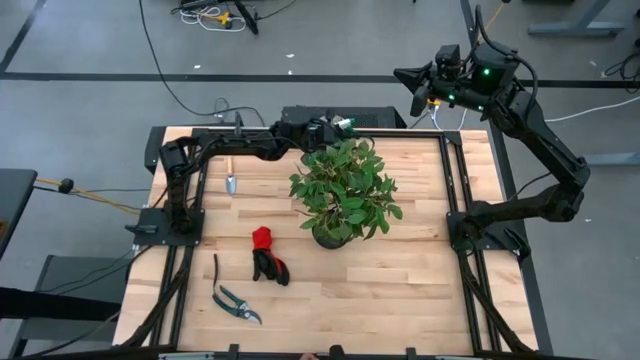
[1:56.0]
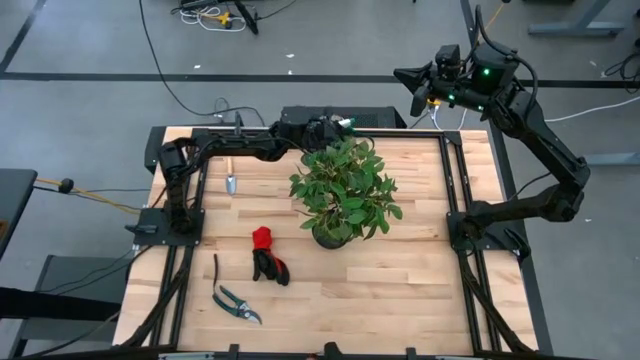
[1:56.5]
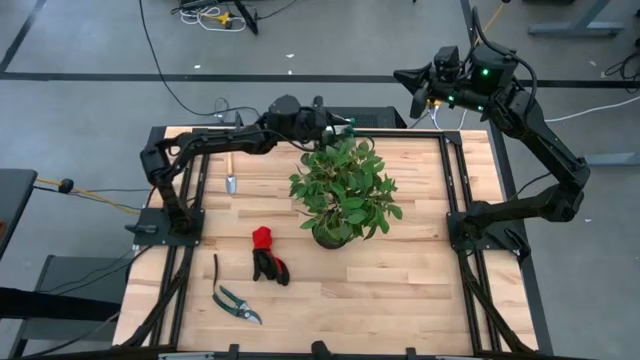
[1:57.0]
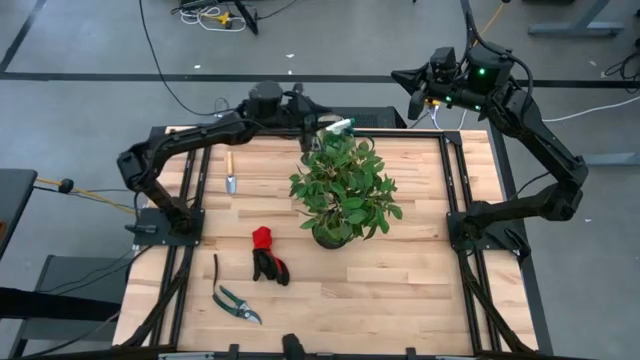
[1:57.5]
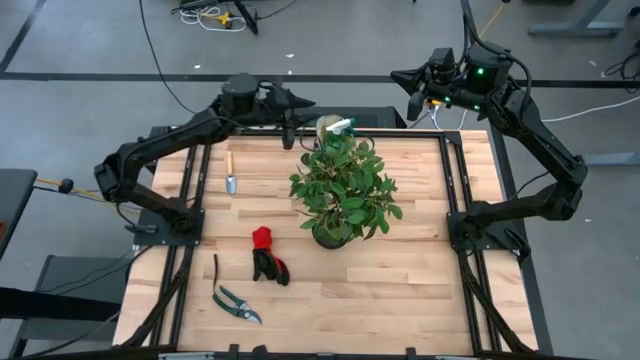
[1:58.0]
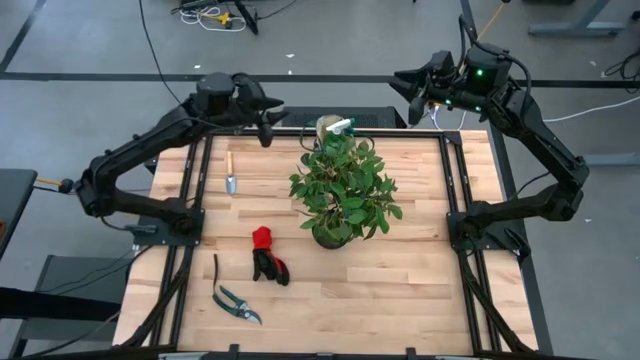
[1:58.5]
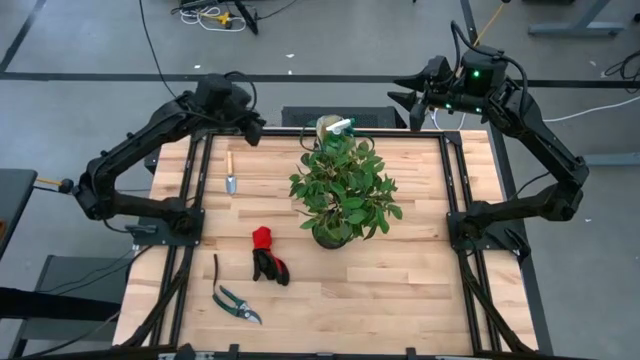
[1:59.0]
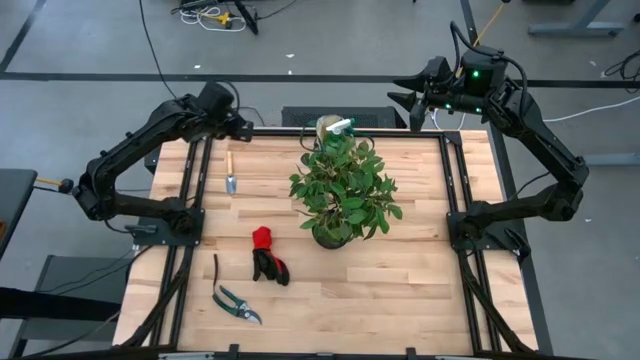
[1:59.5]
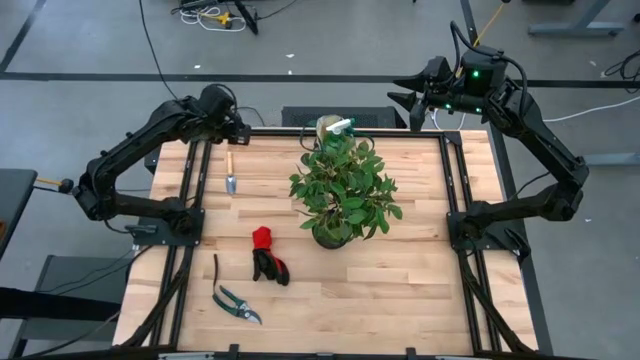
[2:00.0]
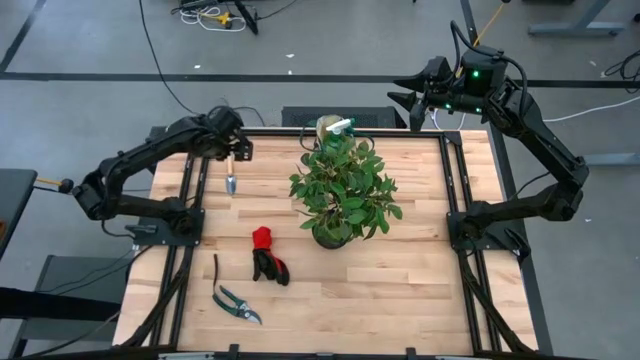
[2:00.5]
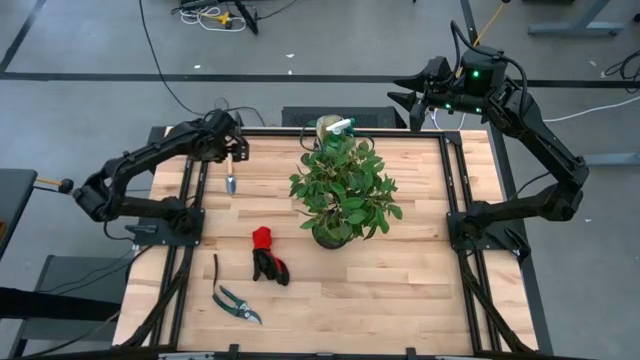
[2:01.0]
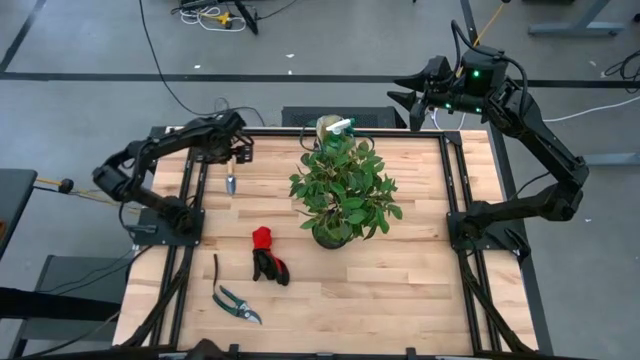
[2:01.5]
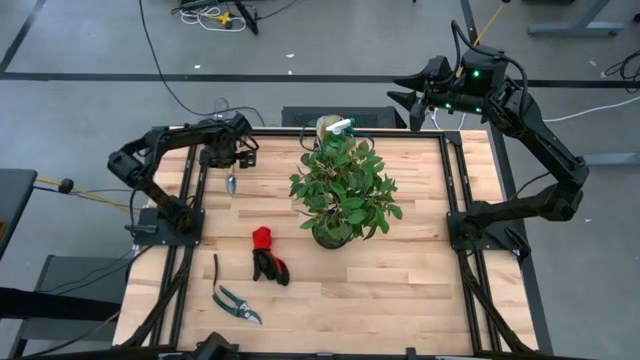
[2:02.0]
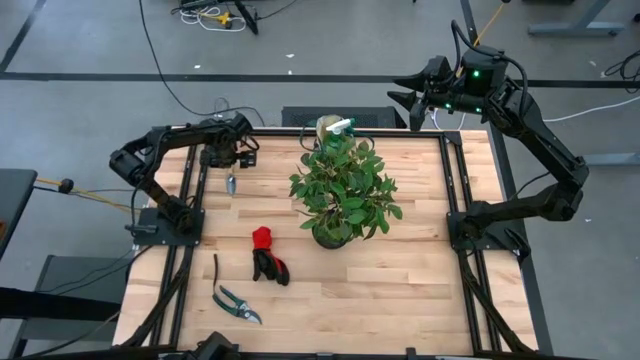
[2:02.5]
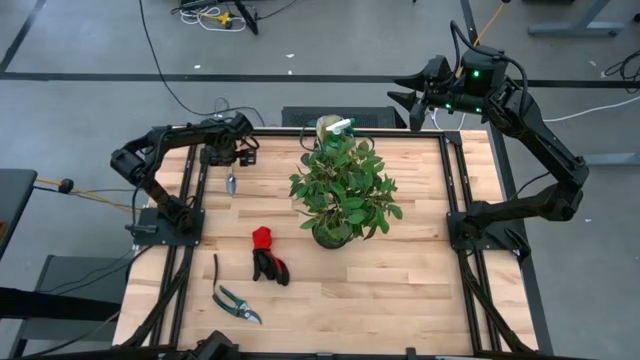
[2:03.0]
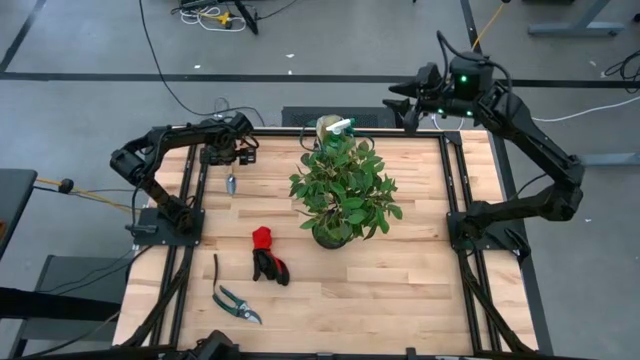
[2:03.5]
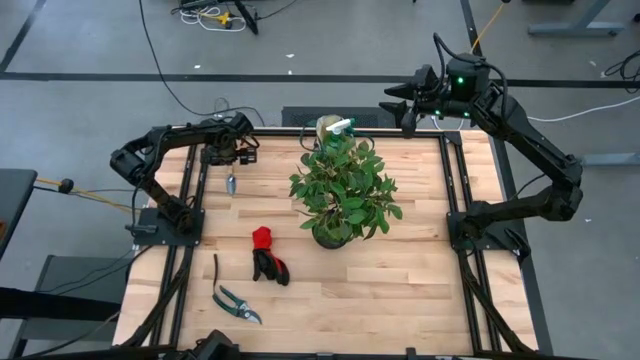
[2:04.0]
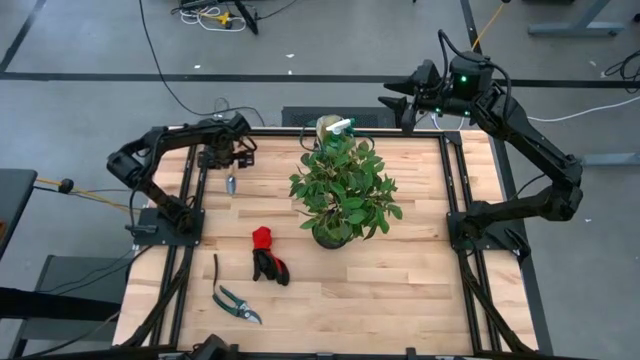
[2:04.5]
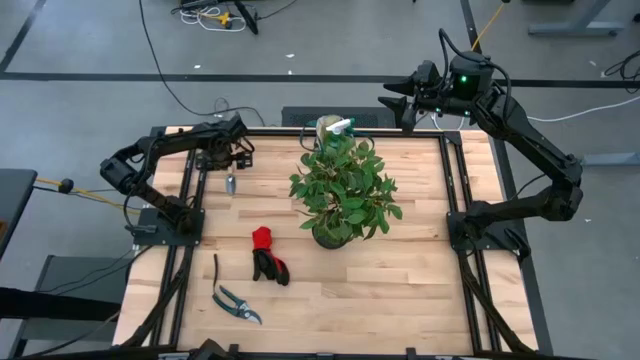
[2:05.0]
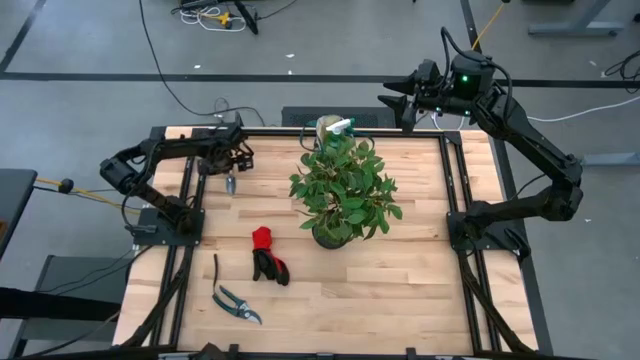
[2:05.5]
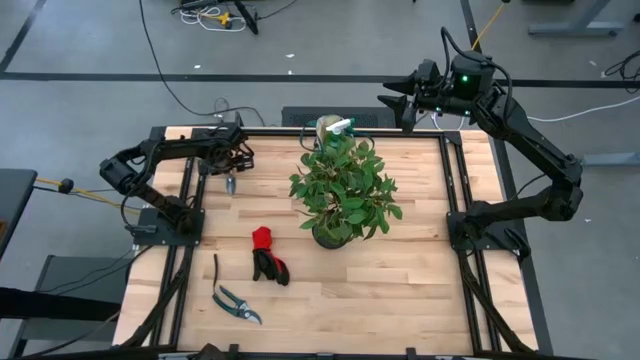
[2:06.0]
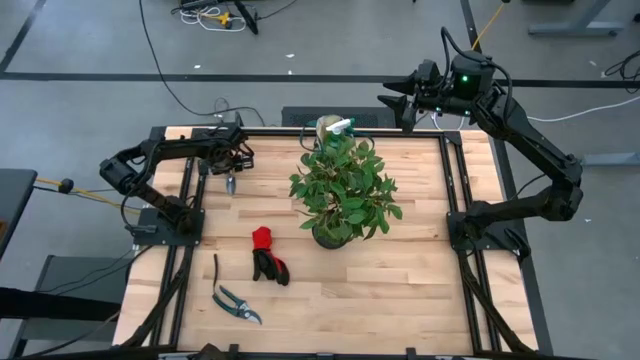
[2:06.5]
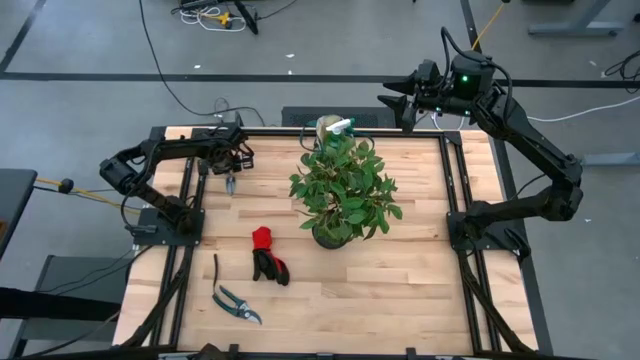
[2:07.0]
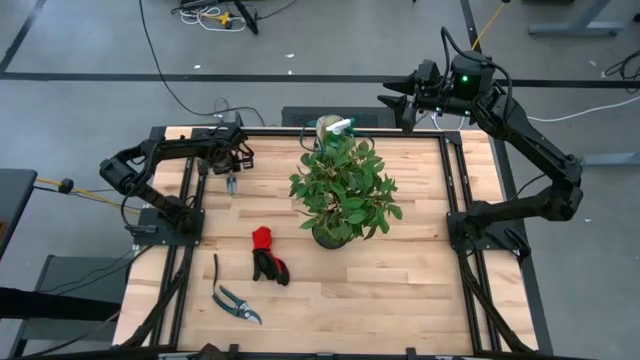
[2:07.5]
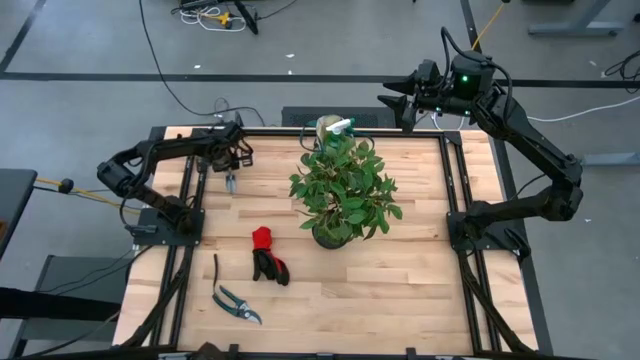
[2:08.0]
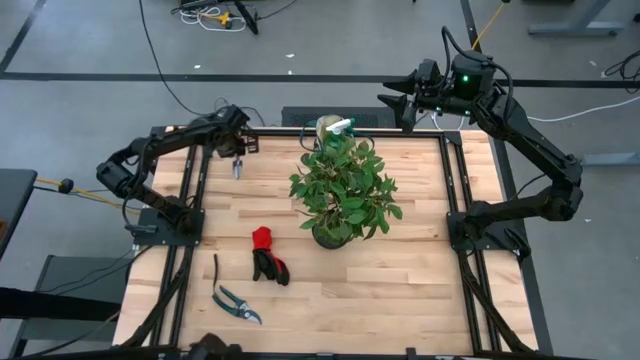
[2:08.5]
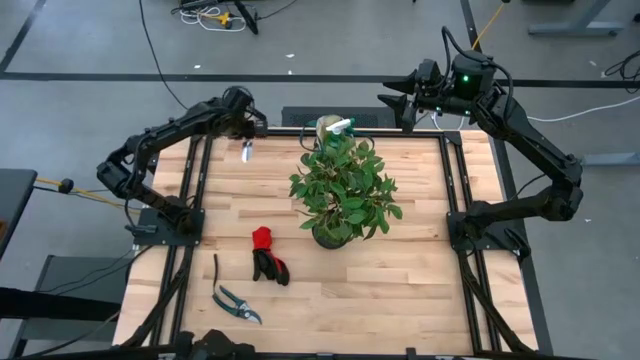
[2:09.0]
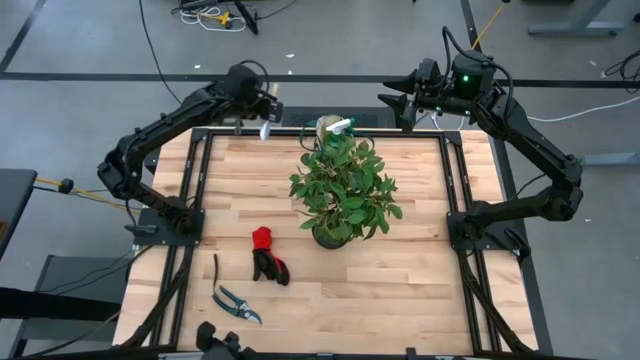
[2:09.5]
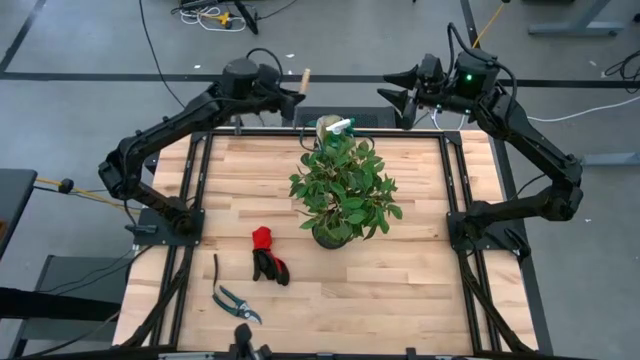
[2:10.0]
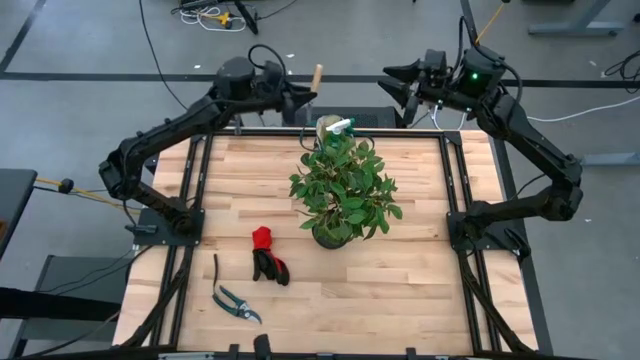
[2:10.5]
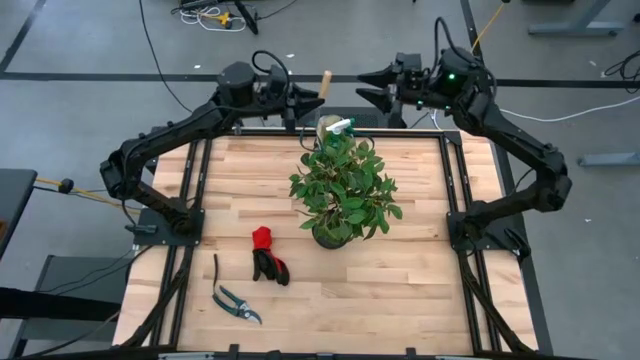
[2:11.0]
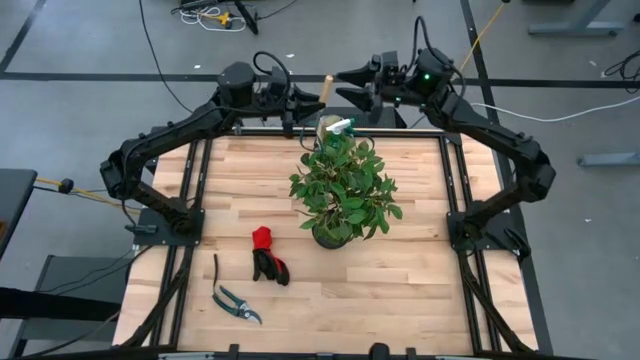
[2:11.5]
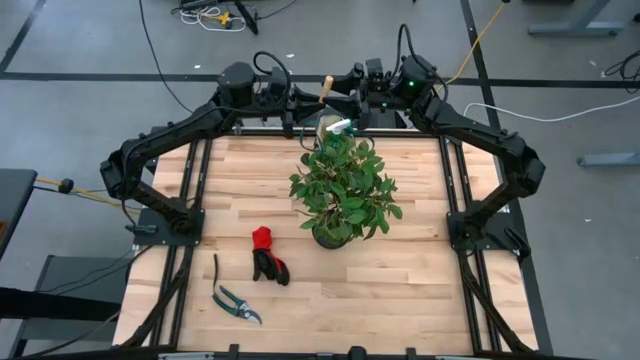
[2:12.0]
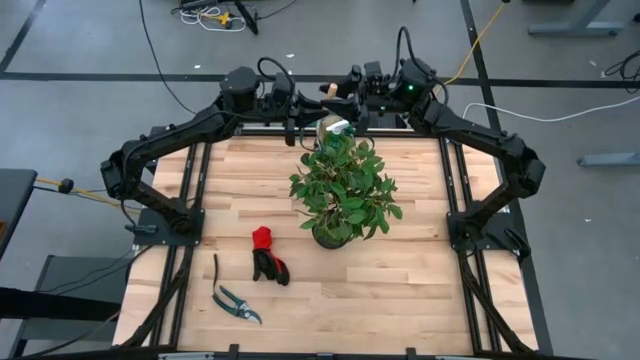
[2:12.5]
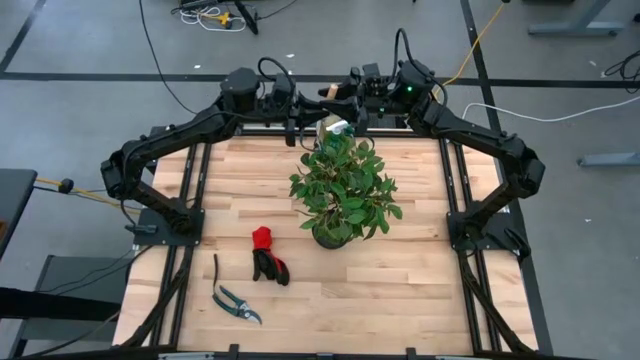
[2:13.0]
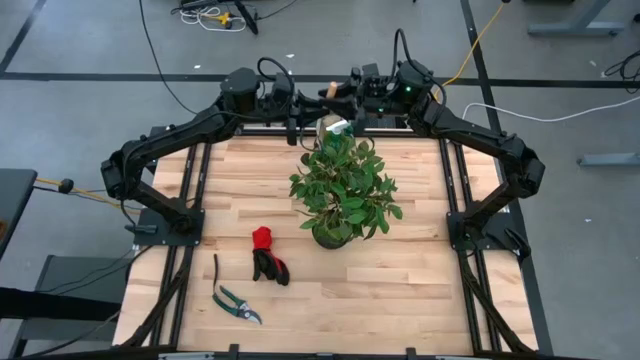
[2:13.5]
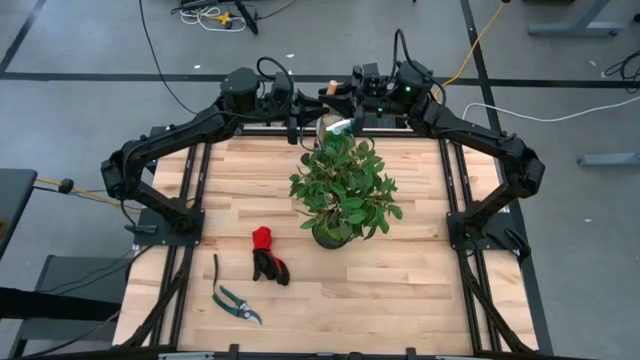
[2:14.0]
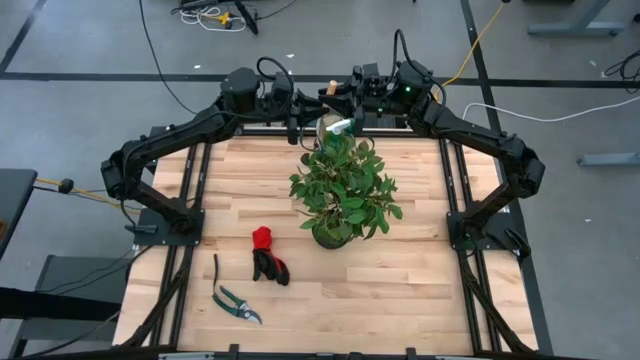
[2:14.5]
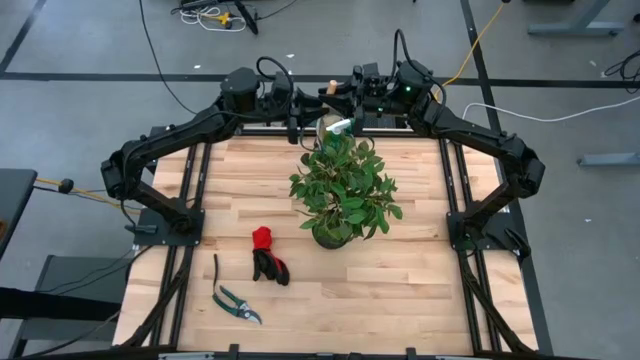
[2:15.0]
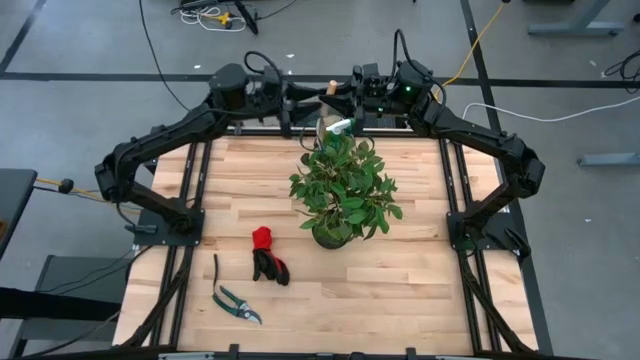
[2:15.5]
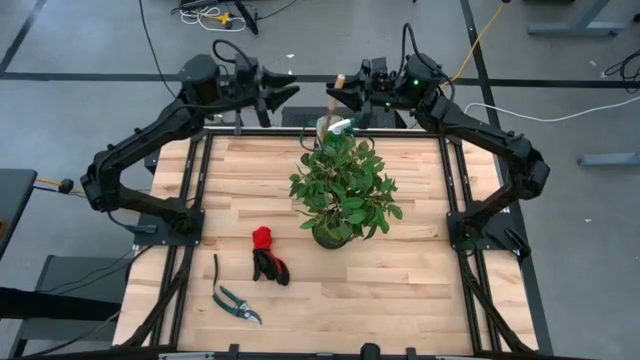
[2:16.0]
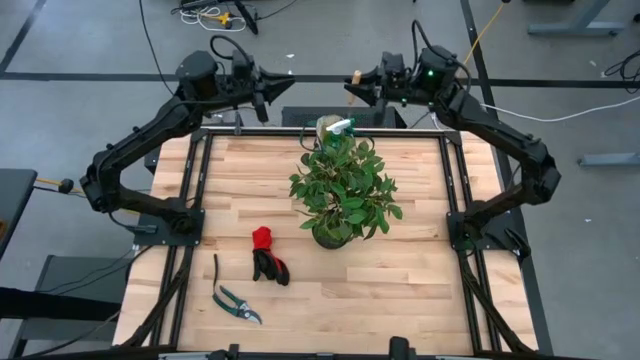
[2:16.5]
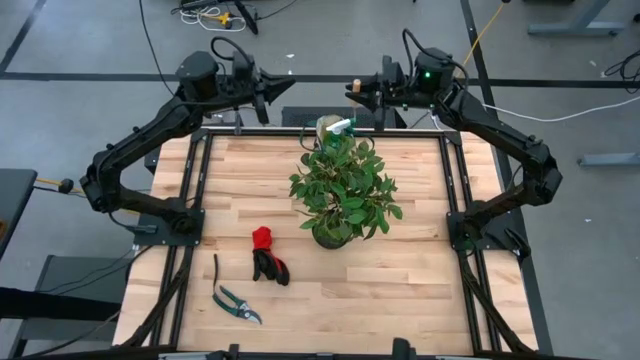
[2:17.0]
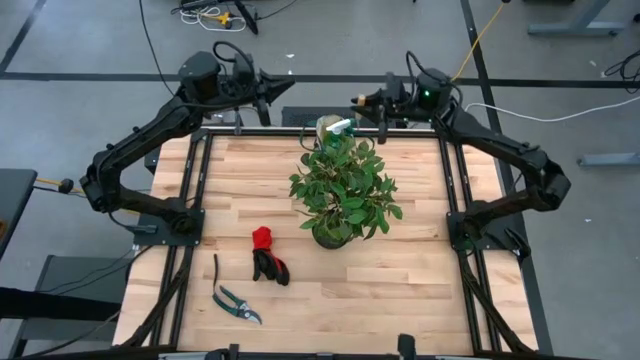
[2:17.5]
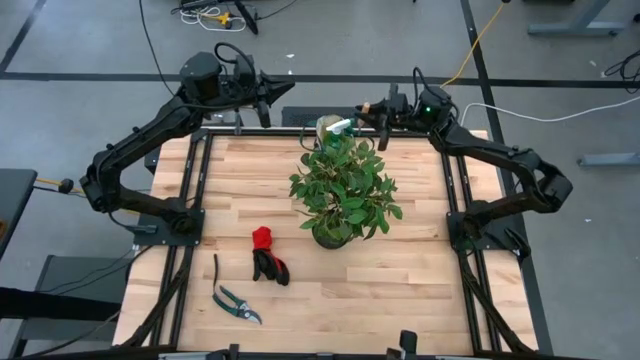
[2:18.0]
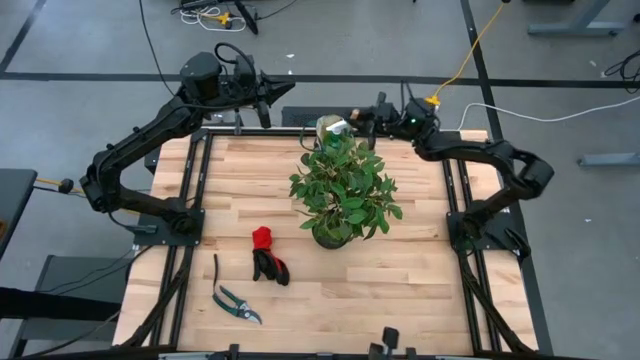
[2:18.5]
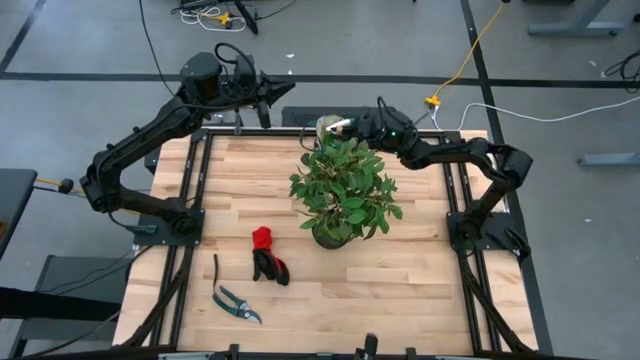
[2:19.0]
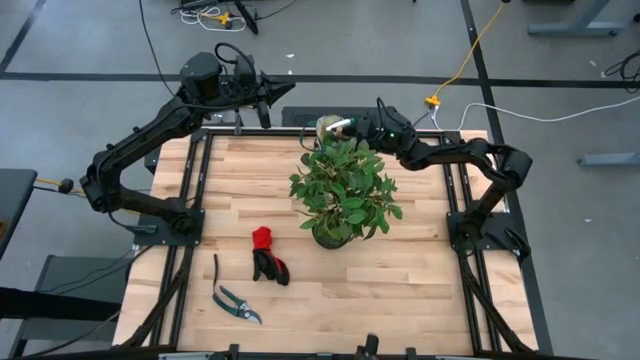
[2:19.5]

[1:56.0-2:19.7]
Task: Pick & Place Garden tools in Gardening bag
Put the brown hand trowel into the gardening bag
